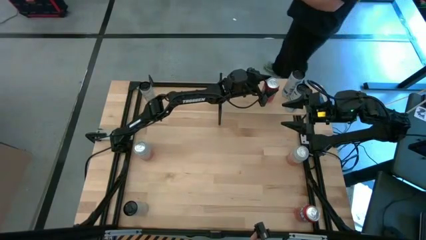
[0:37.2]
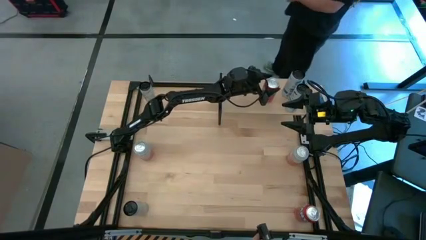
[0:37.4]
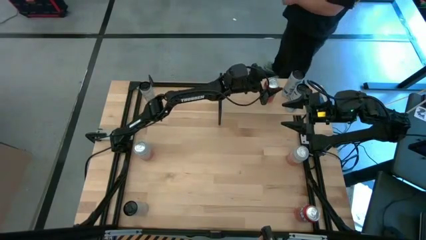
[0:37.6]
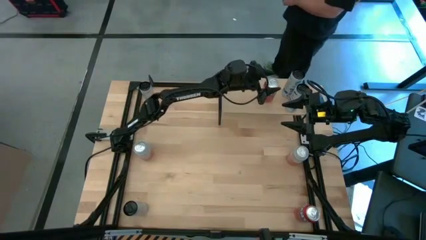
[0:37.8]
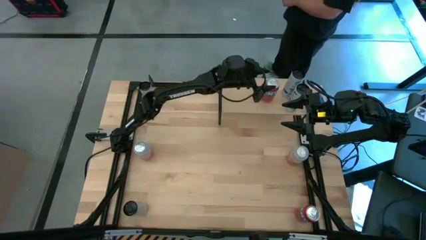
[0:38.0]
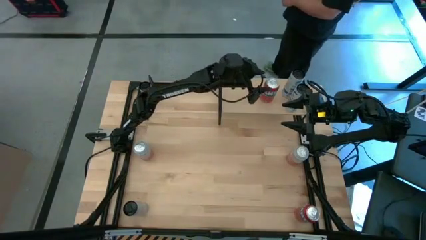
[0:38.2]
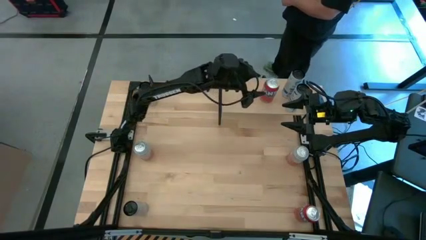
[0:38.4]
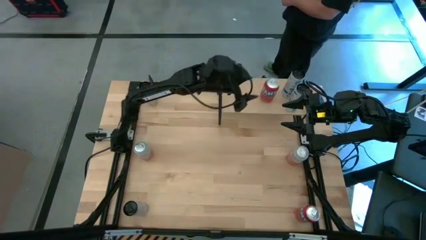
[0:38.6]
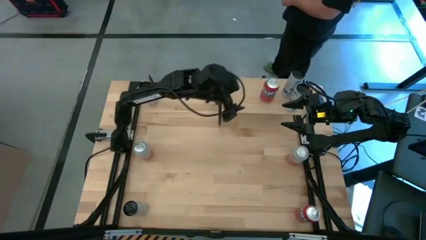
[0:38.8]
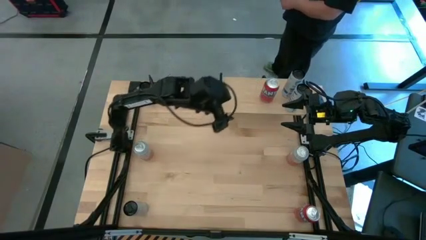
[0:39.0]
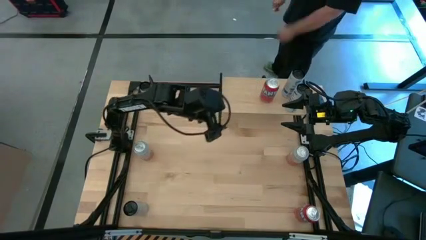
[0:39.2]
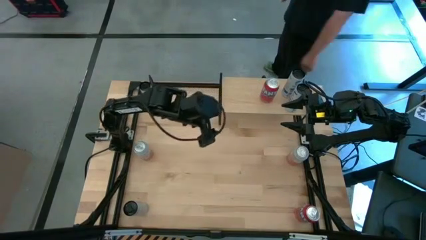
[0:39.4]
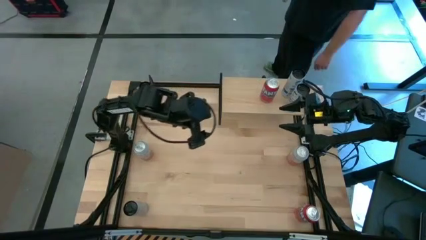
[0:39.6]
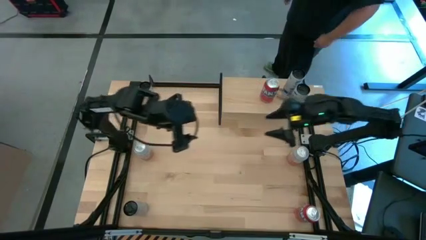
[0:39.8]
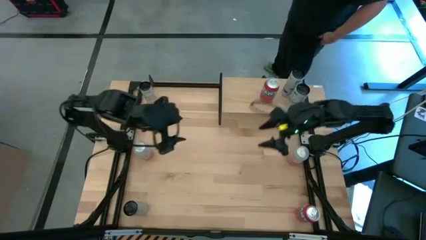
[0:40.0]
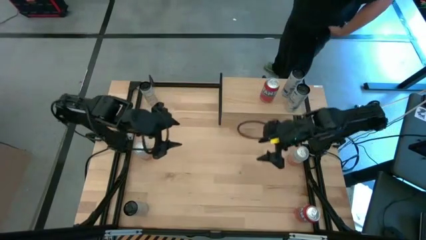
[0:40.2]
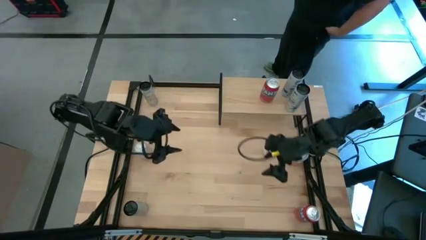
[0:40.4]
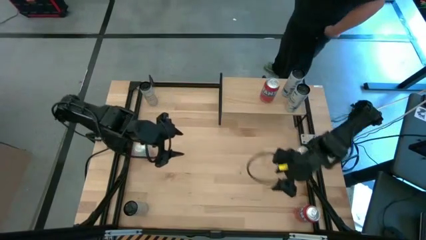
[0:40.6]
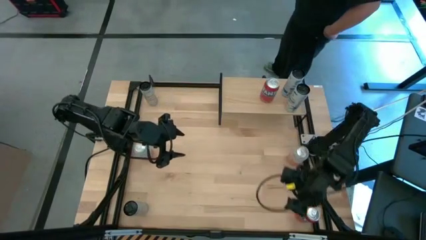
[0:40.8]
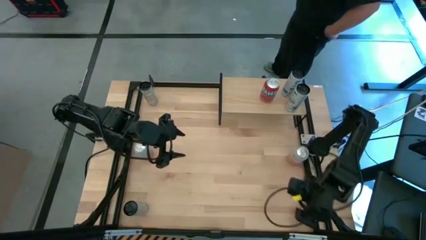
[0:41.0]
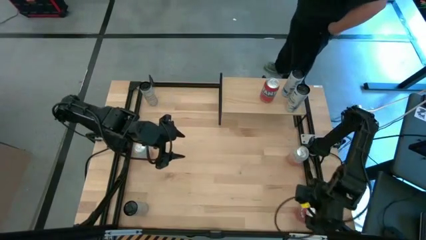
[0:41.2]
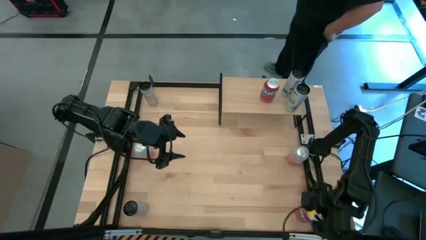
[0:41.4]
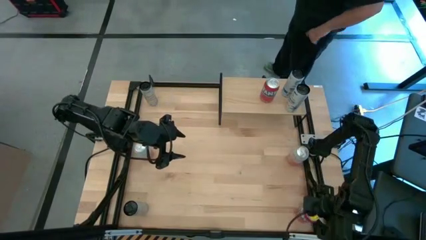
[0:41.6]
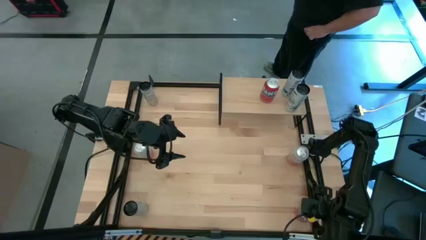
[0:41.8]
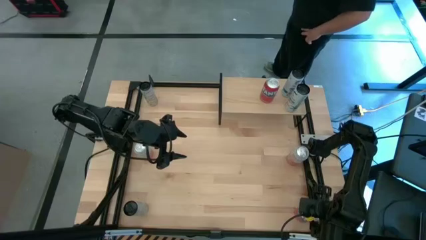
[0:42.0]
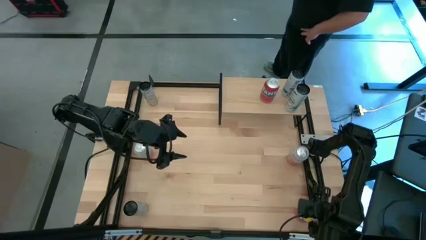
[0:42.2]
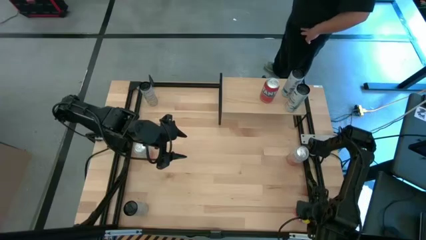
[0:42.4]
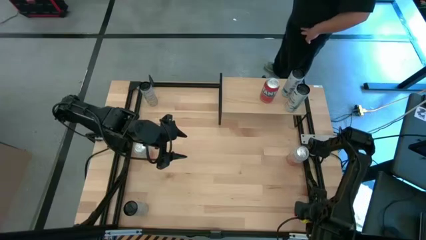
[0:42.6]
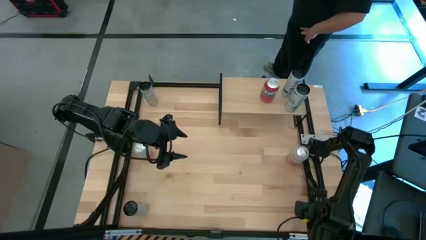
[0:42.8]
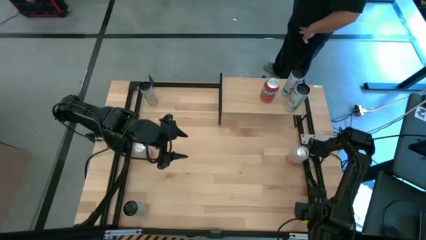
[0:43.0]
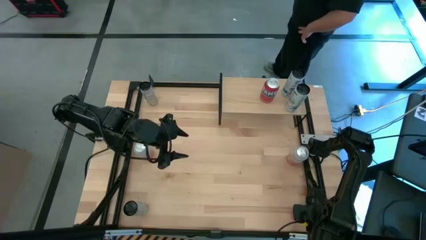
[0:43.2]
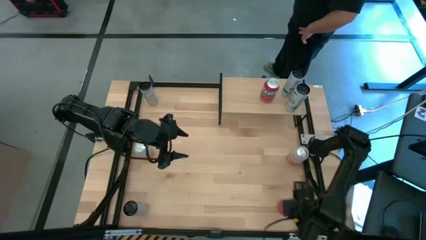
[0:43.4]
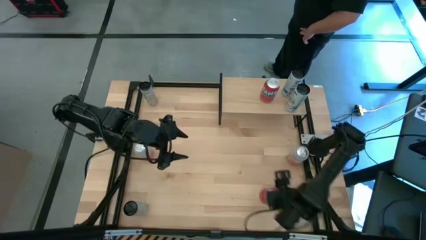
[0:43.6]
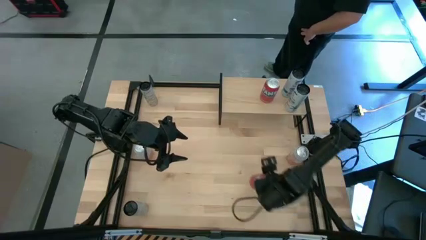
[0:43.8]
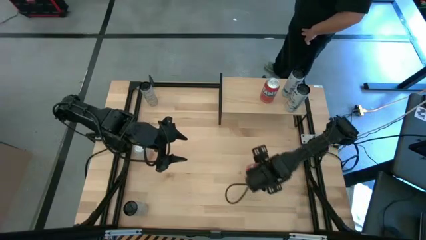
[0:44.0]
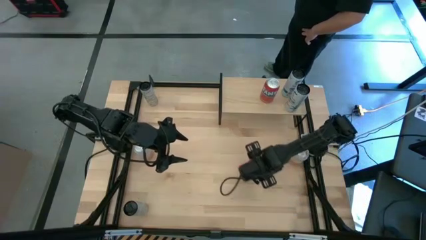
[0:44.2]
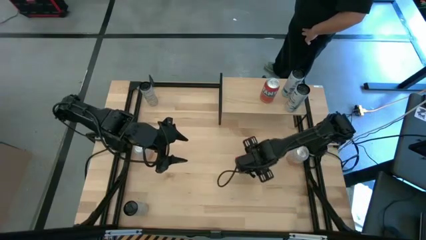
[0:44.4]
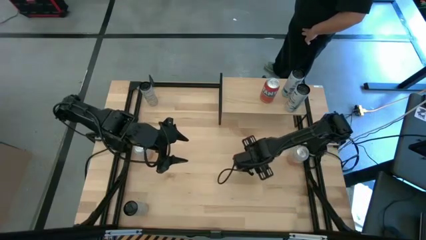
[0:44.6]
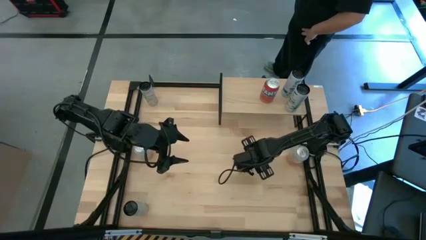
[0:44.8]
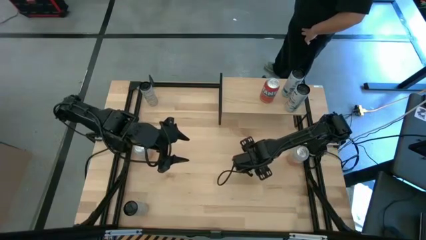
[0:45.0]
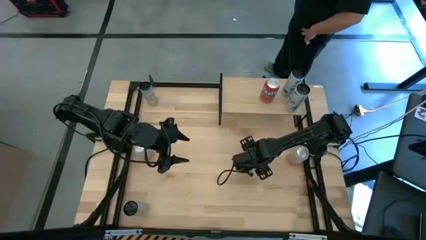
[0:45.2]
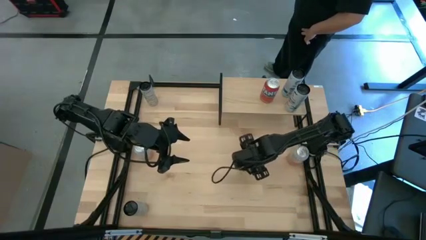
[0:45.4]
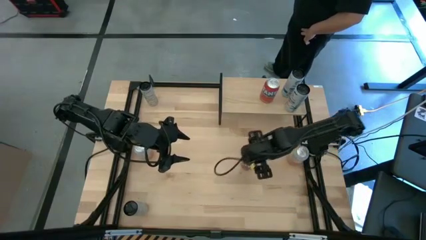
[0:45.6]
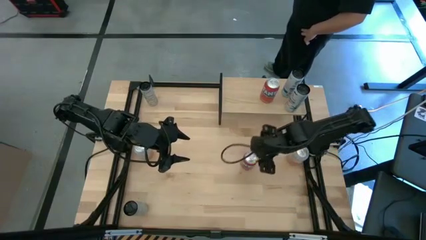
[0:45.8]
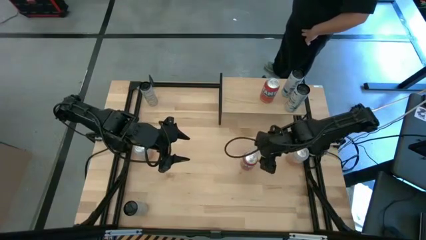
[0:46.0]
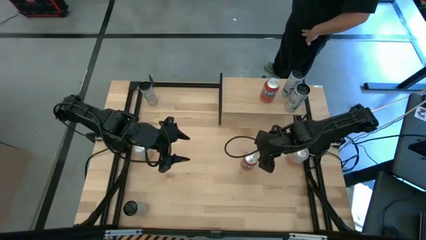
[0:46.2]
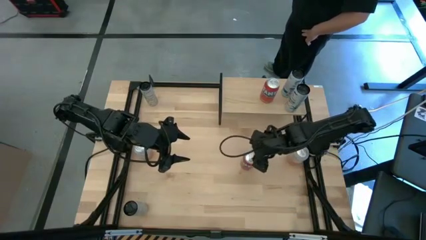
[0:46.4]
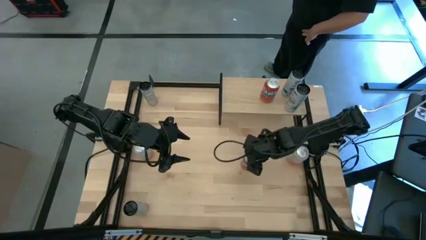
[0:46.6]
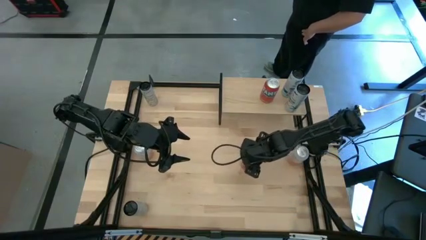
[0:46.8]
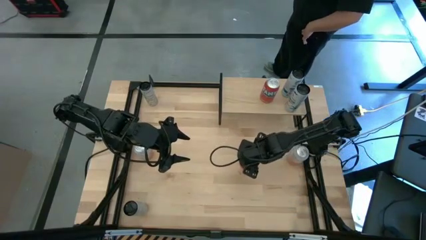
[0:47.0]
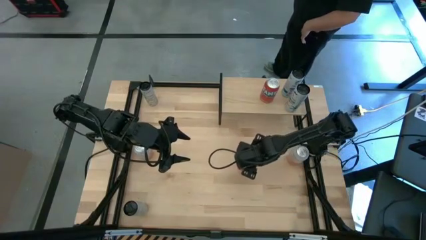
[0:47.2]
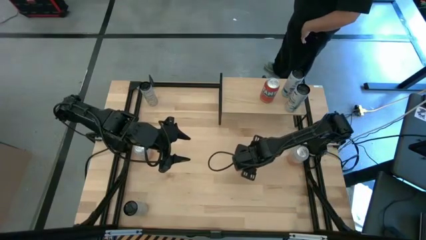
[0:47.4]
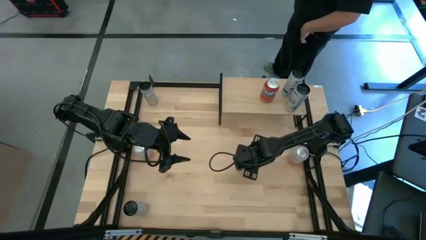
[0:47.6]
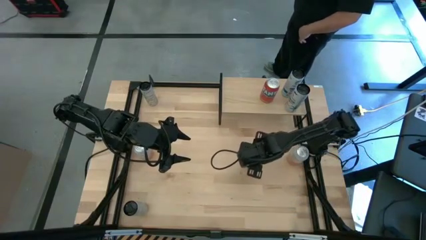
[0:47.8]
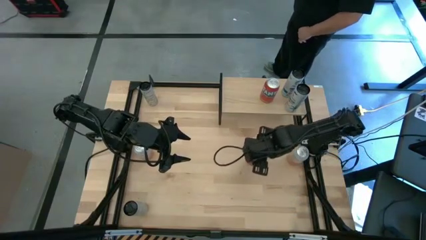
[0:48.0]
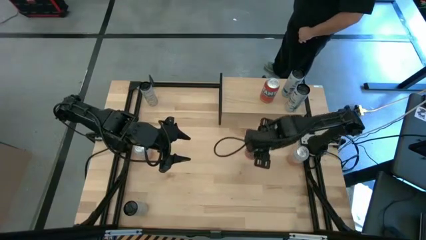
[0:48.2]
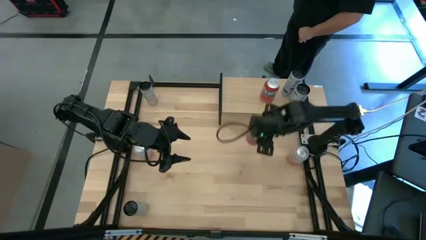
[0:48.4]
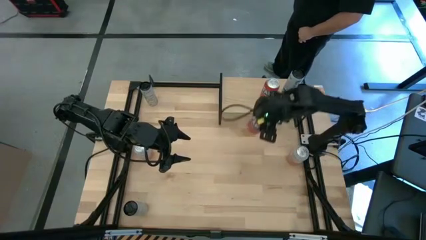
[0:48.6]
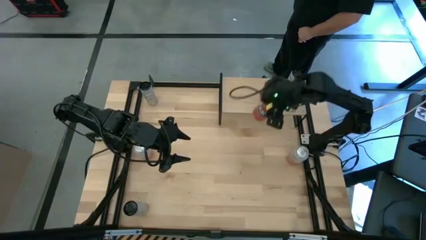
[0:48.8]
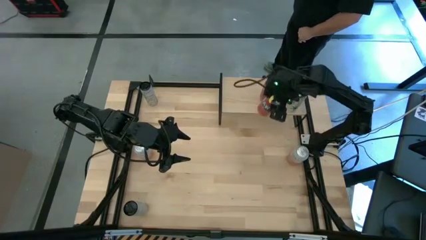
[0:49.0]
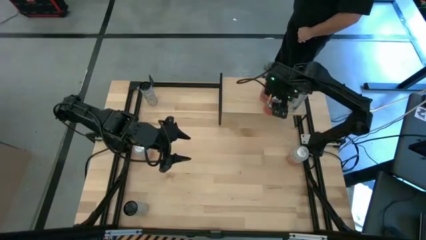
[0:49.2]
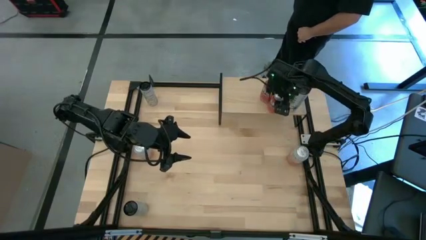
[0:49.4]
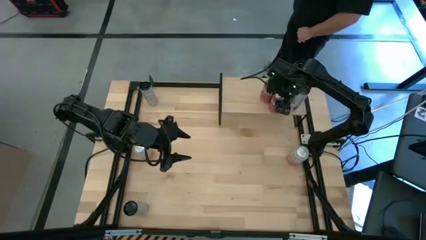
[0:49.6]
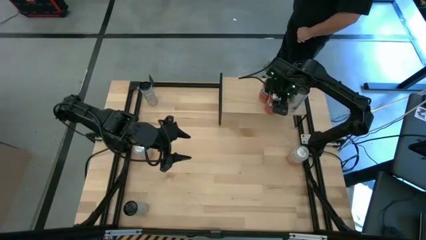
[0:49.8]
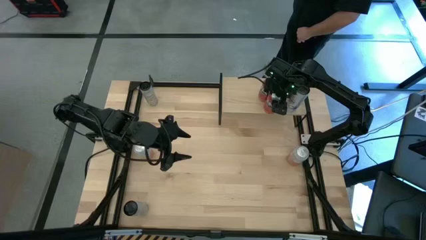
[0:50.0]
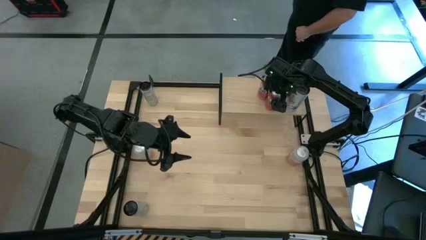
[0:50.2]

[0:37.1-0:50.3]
Task: Place canned beverage on shelf
Put the orange soda can on the shelf aligned with the other orange soda can

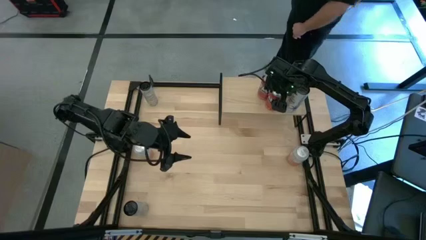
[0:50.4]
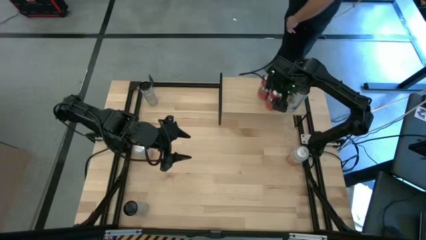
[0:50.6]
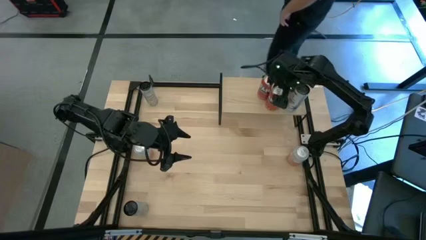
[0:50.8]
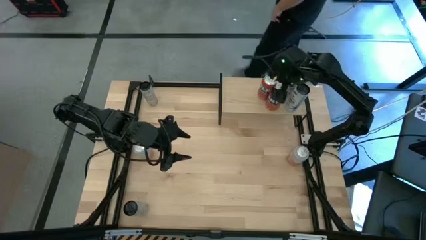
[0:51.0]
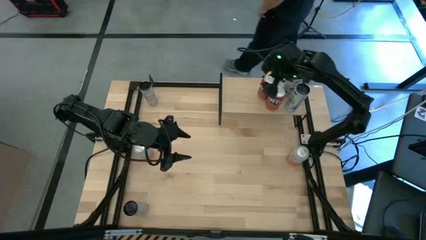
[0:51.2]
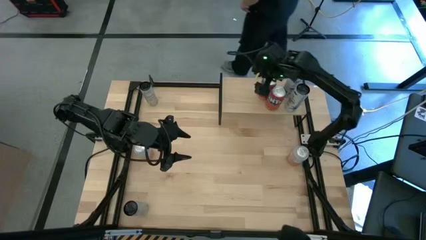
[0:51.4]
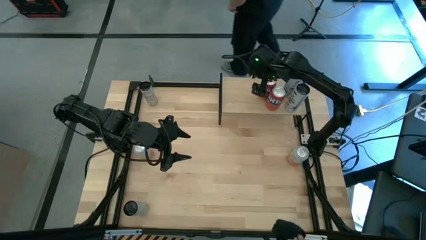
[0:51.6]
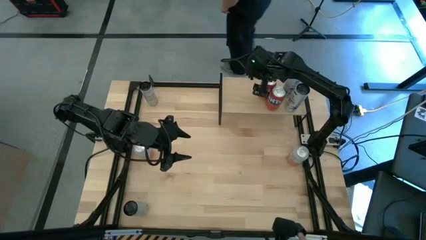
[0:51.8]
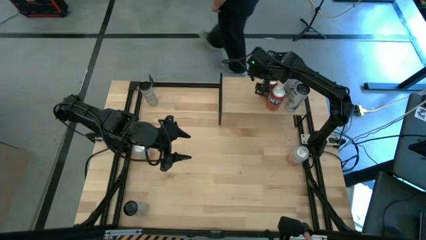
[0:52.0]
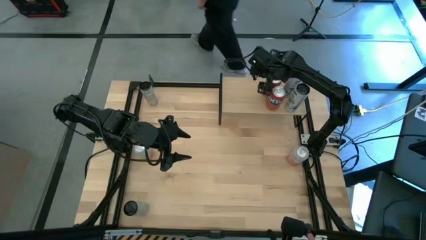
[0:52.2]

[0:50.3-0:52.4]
Adjust the top orange soda can on the shelf
